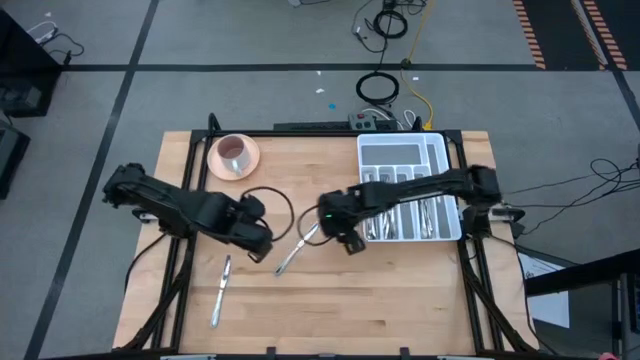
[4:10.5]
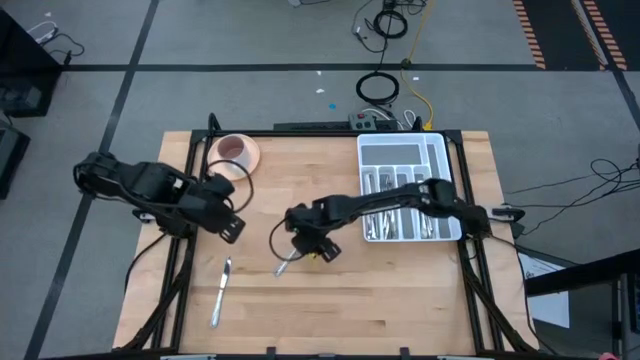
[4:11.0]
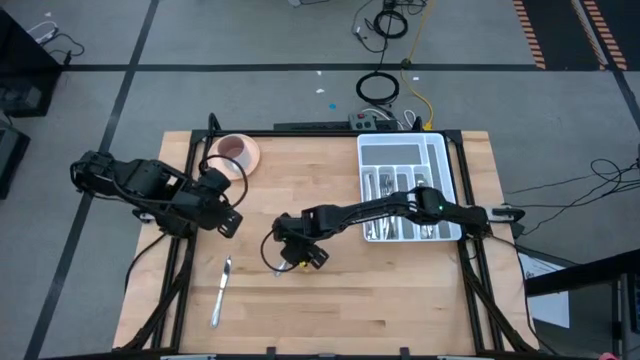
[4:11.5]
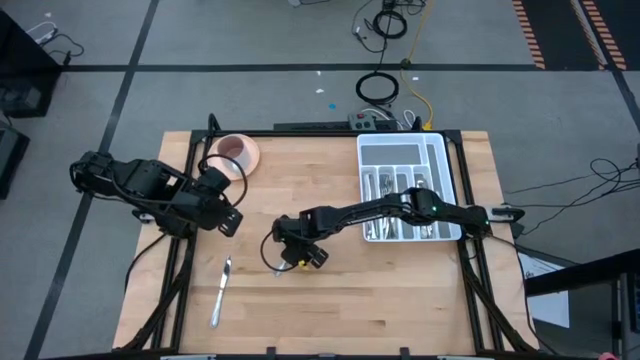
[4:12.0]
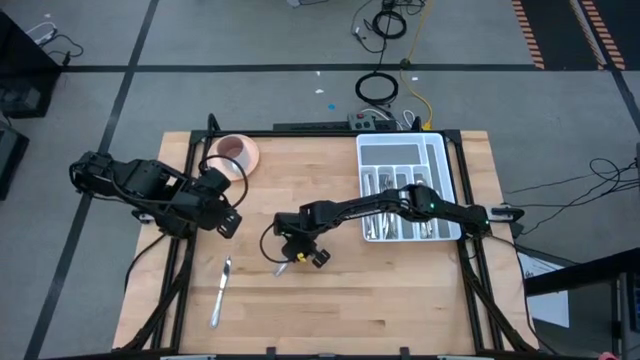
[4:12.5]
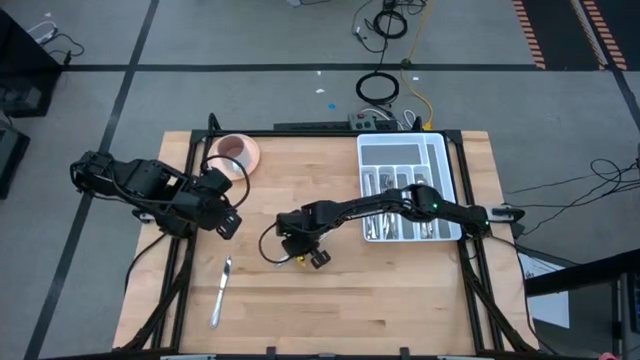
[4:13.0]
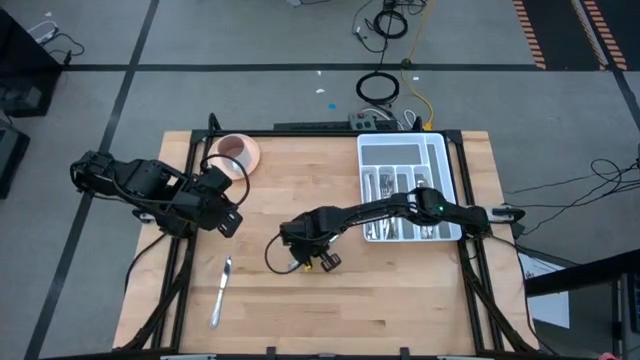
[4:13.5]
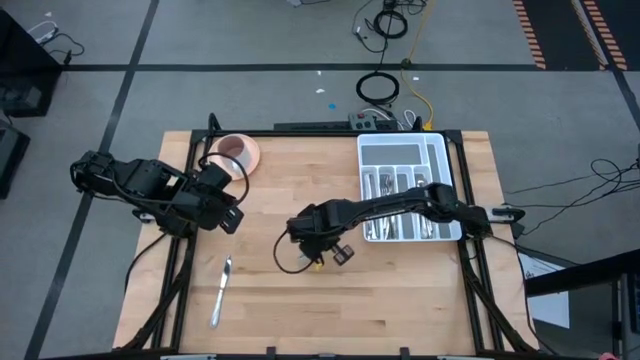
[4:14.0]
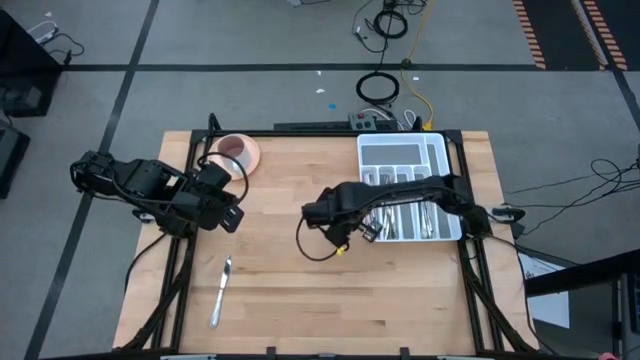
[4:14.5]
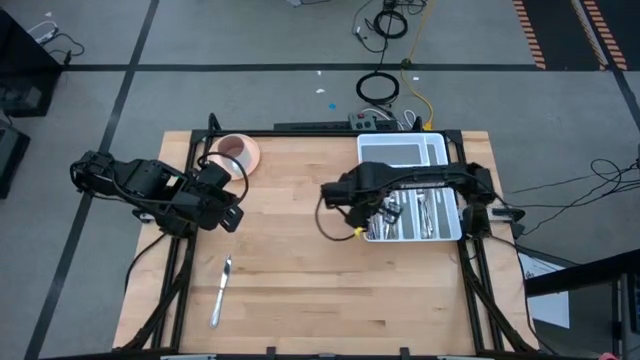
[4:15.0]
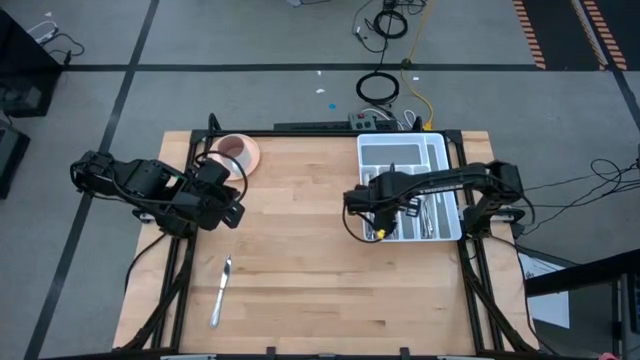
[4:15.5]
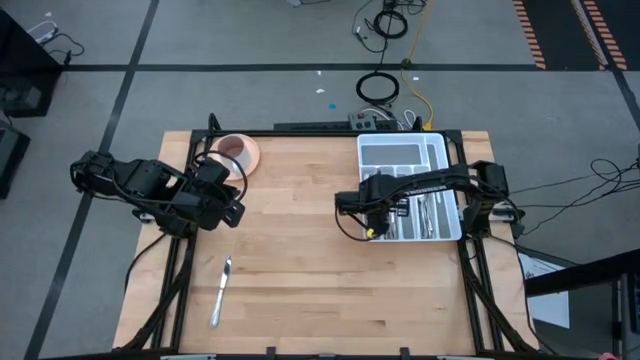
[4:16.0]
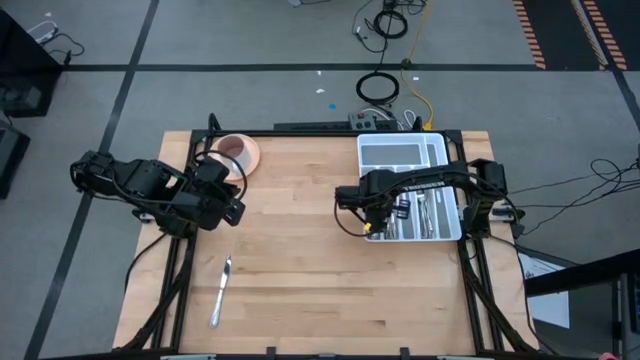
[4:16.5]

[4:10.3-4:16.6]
Task: Sort silverware
Put the silver table knife into the silverware rack

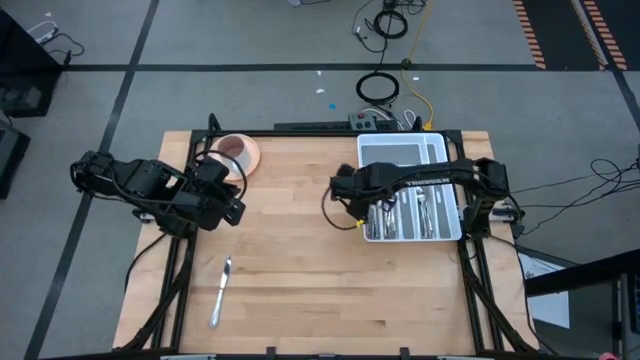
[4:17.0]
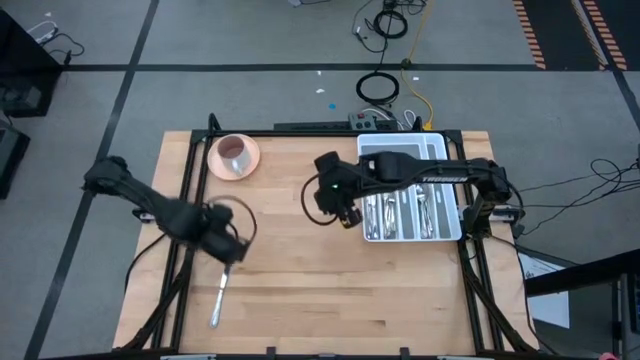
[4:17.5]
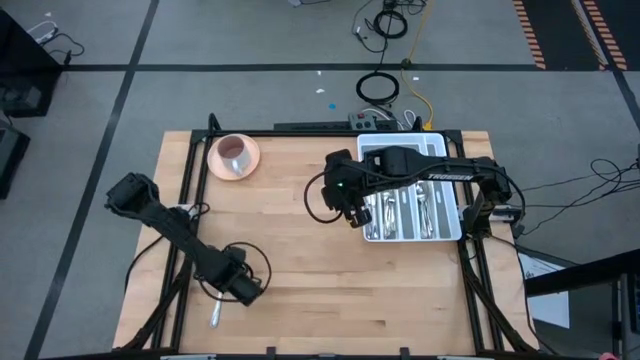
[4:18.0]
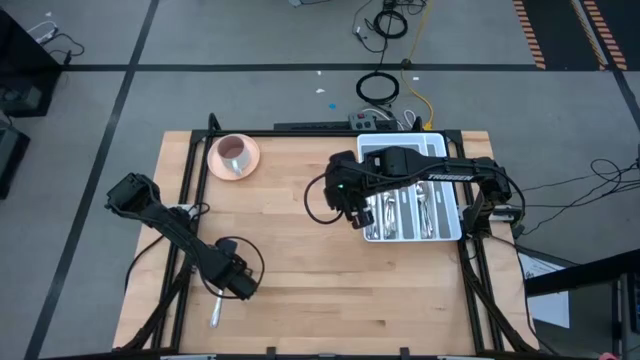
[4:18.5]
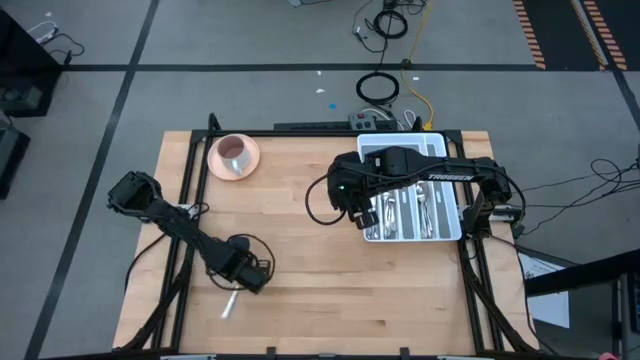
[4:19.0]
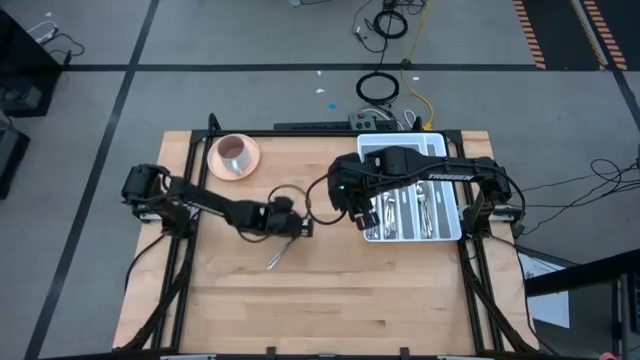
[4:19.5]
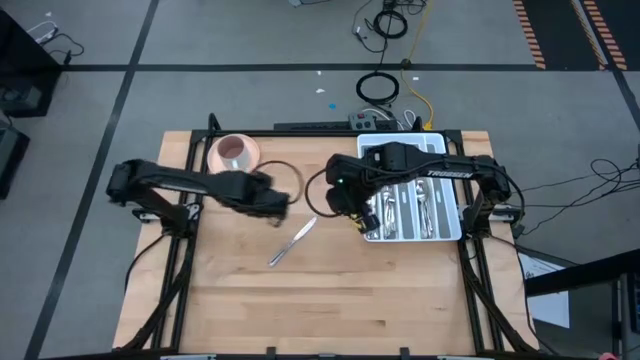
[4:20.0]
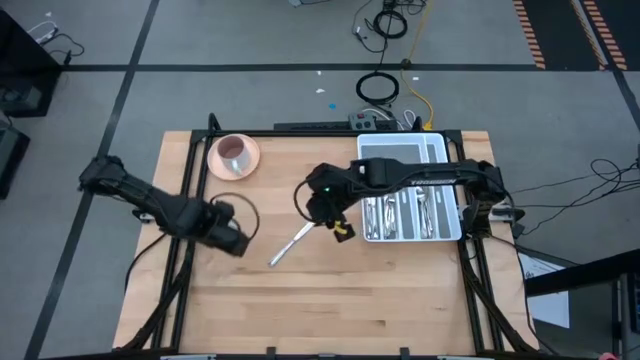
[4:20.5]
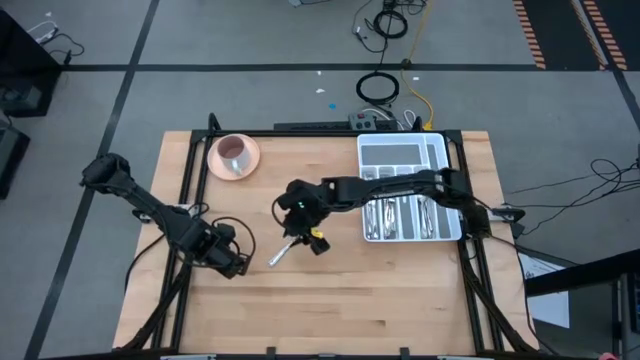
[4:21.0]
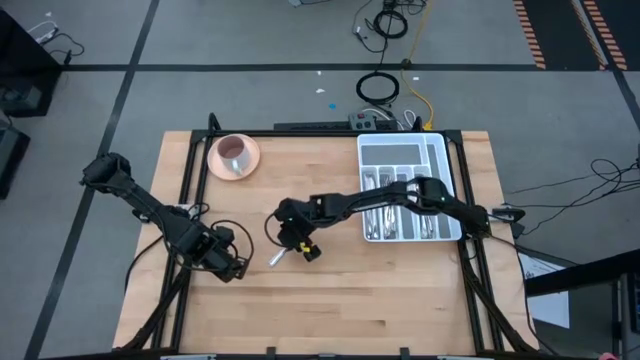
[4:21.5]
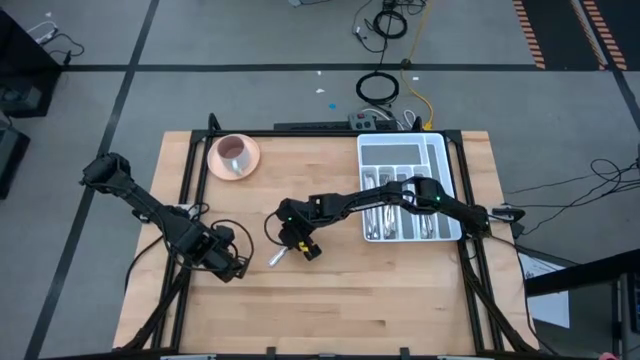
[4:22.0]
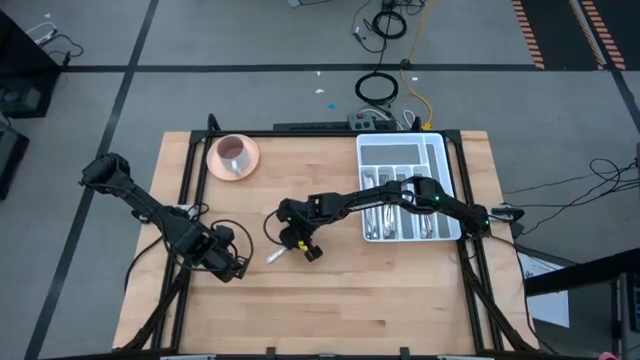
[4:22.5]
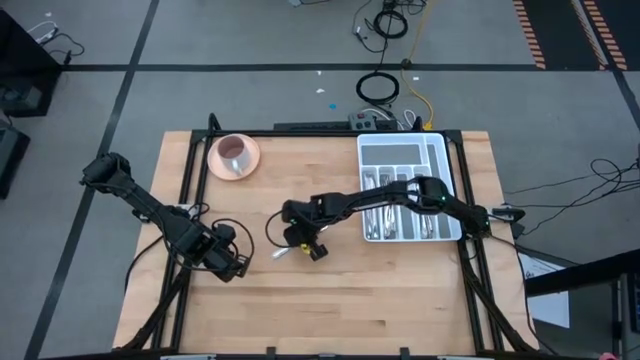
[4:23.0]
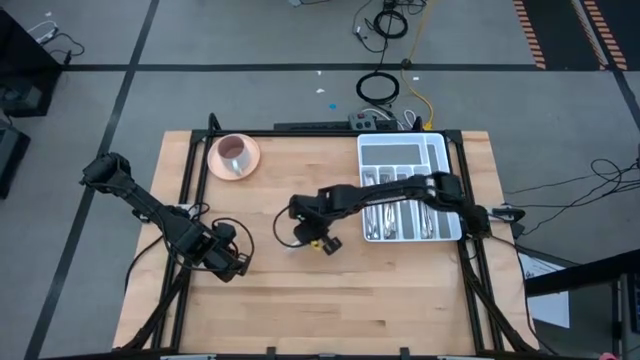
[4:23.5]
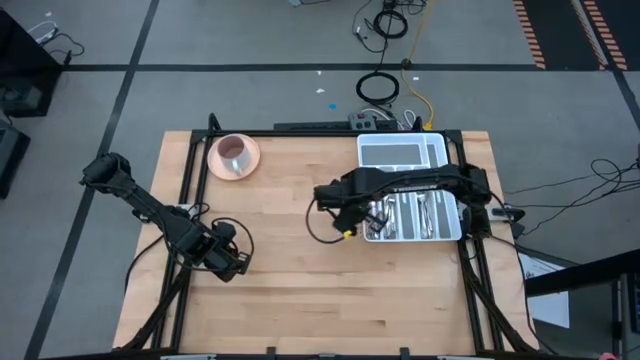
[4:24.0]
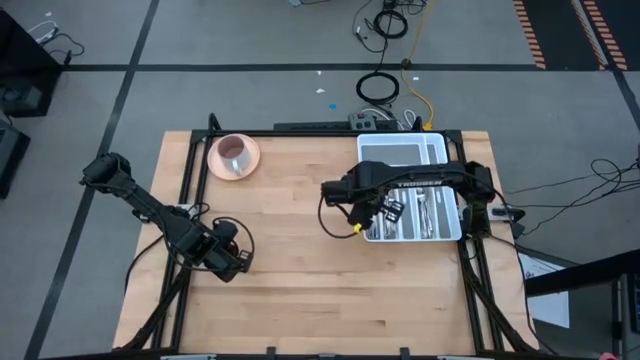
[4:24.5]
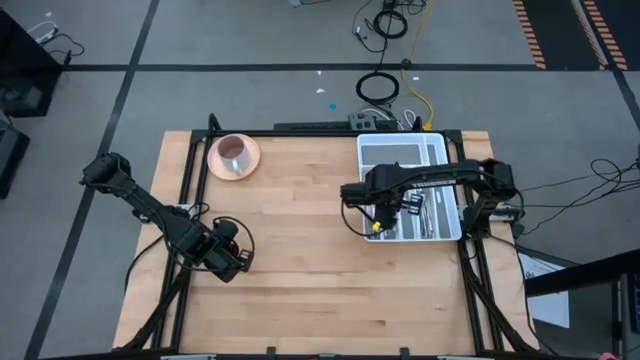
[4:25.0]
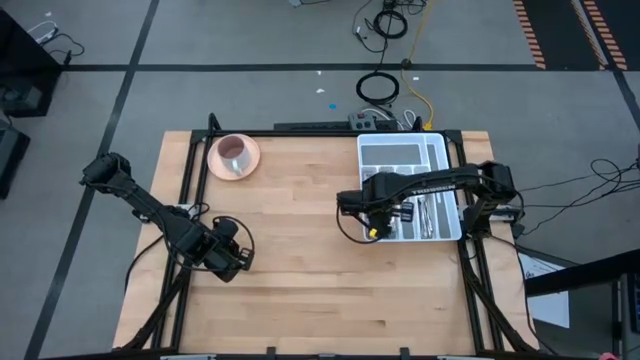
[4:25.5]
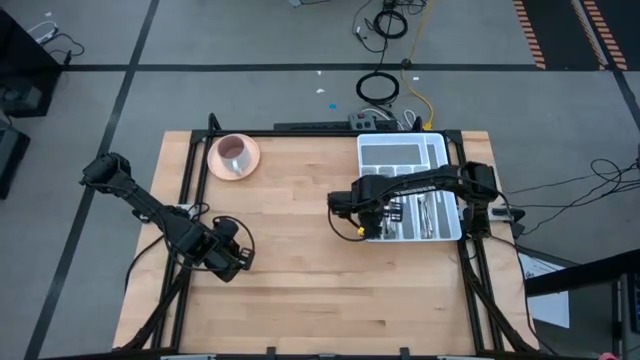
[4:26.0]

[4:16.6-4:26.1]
Put the table knife into the silverware rack

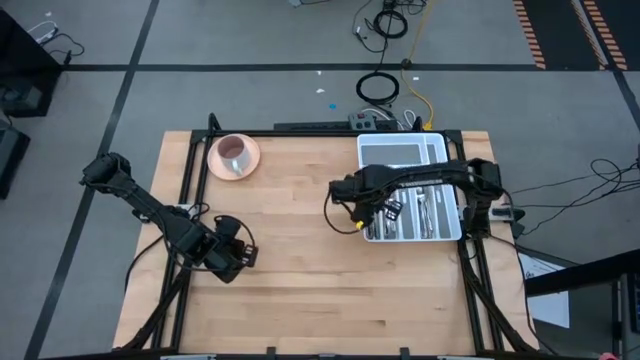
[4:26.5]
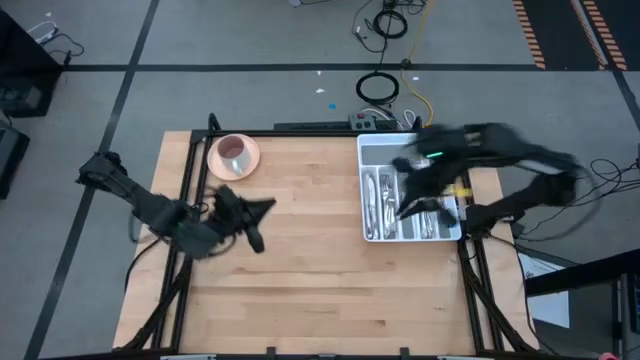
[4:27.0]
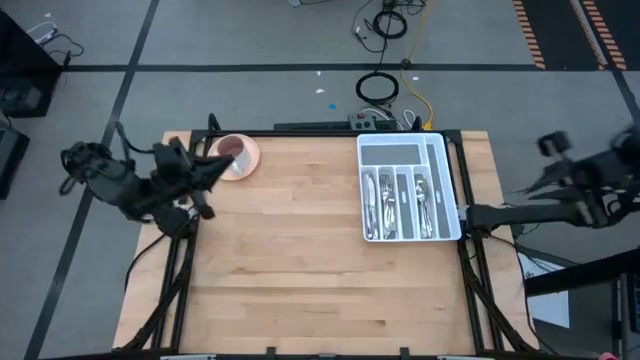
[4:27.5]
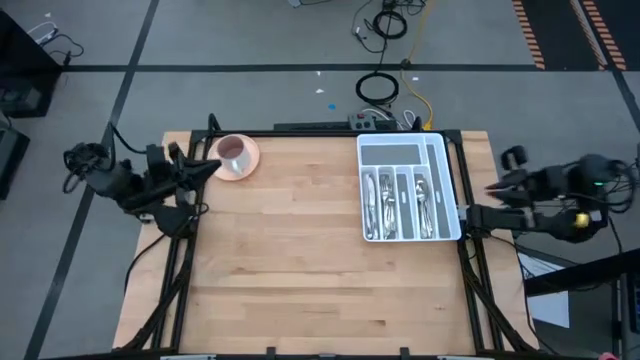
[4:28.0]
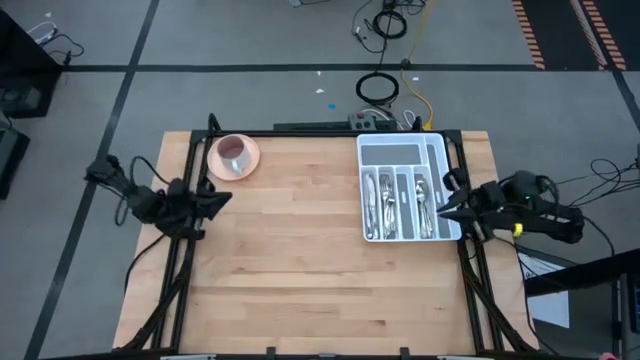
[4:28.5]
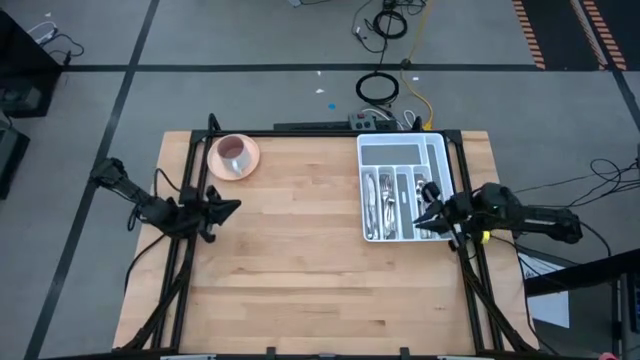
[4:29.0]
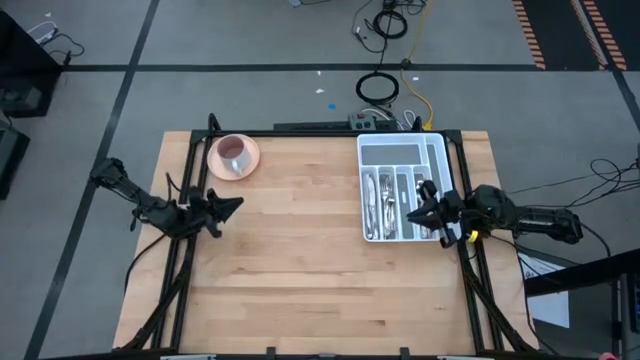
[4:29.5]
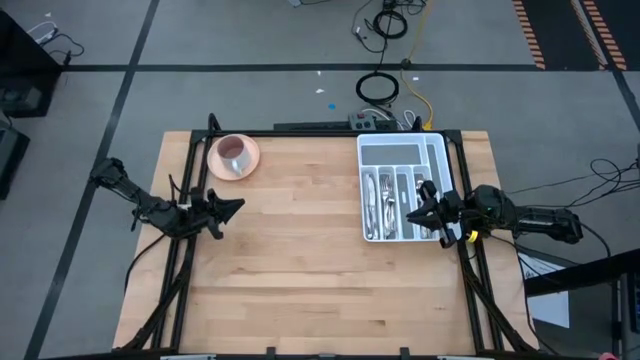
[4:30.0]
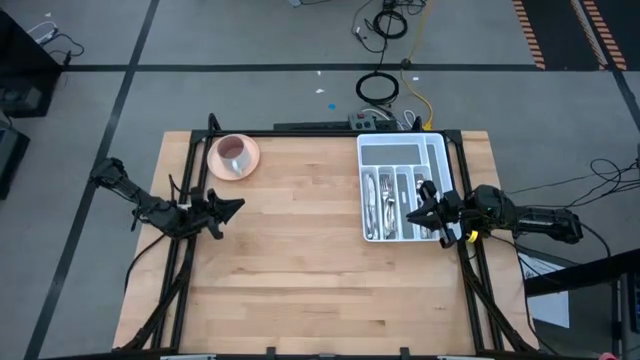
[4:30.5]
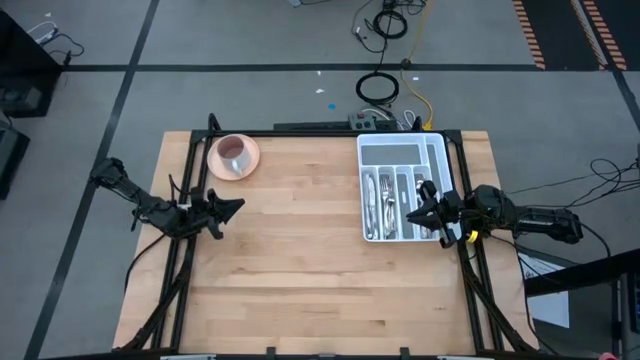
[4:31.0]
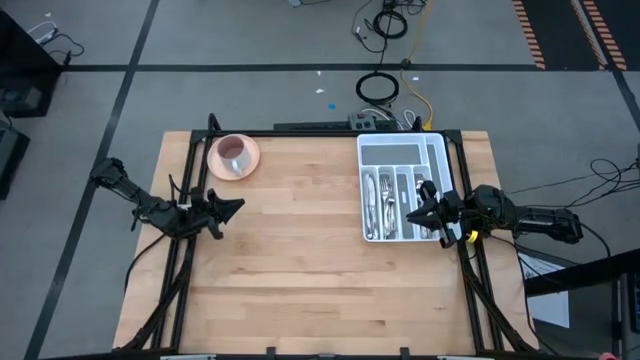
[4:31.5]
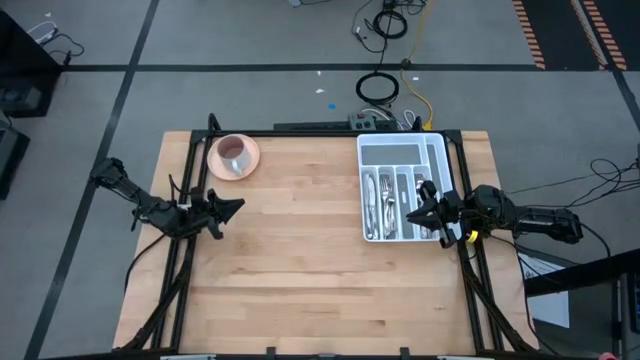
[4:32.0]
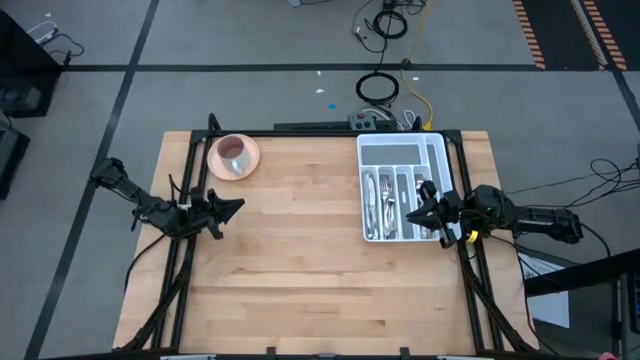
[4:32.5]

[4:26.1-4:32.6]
Return to Home Position
